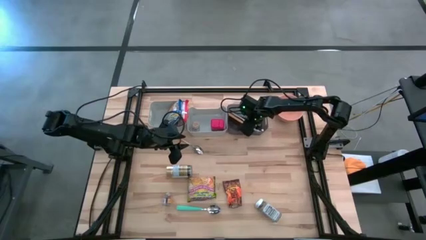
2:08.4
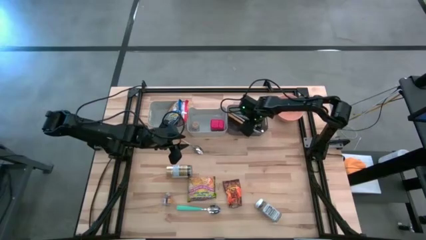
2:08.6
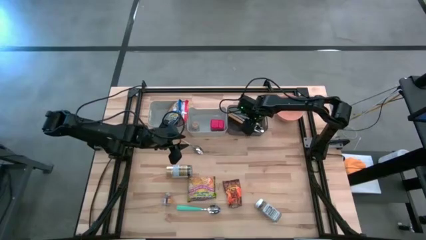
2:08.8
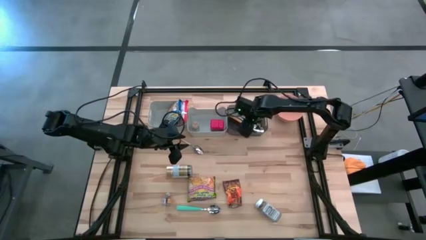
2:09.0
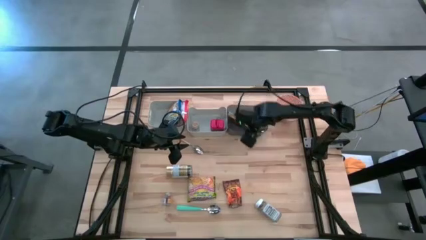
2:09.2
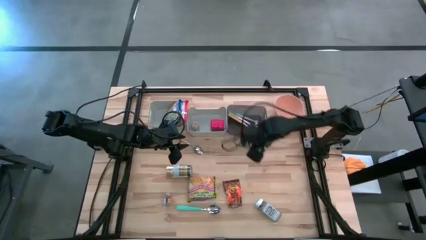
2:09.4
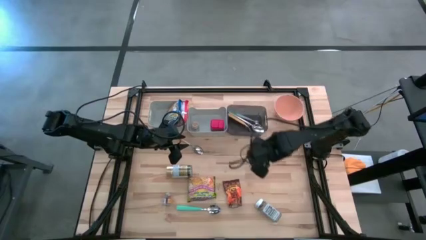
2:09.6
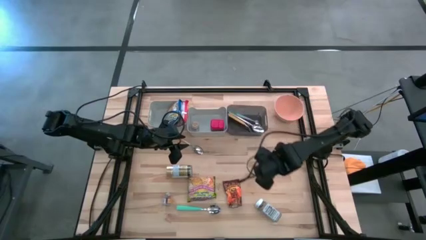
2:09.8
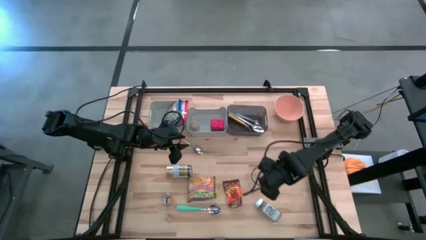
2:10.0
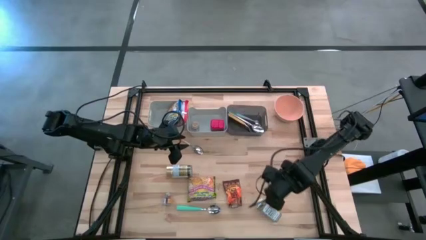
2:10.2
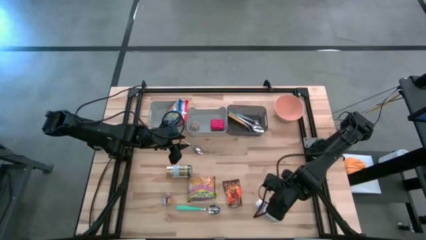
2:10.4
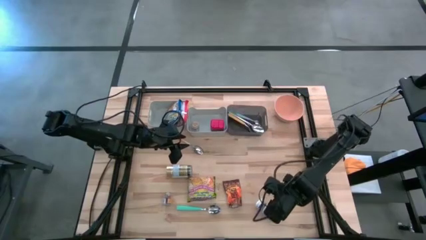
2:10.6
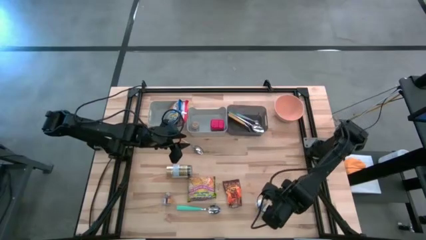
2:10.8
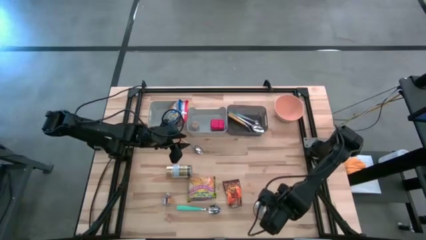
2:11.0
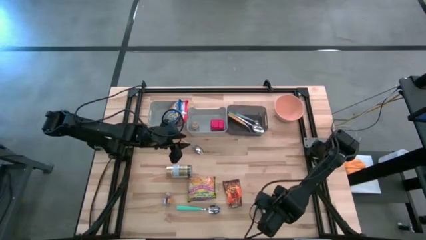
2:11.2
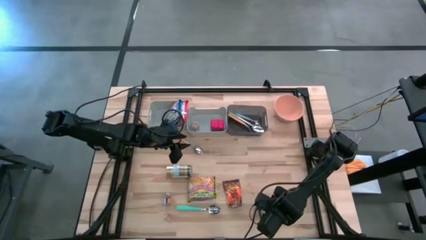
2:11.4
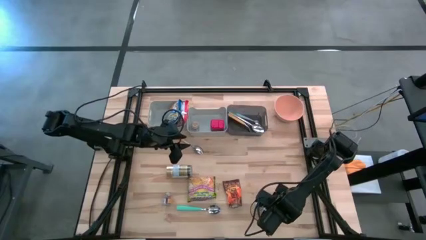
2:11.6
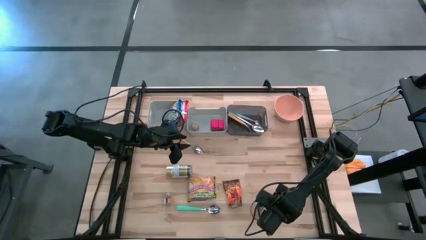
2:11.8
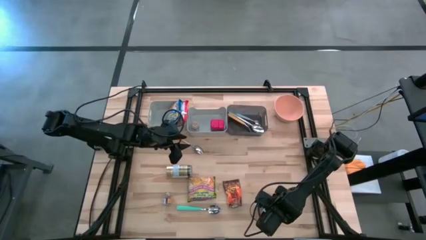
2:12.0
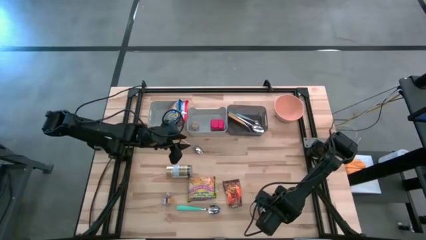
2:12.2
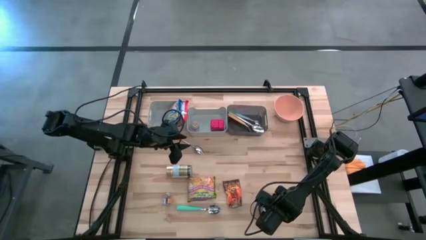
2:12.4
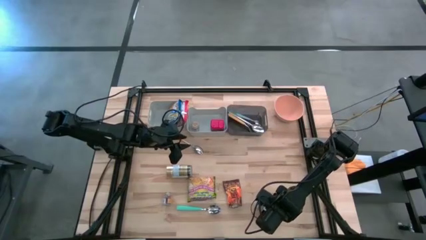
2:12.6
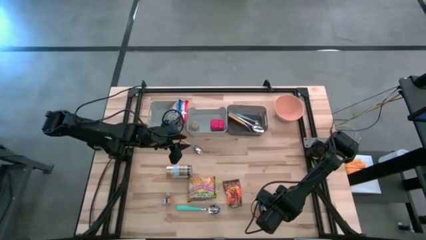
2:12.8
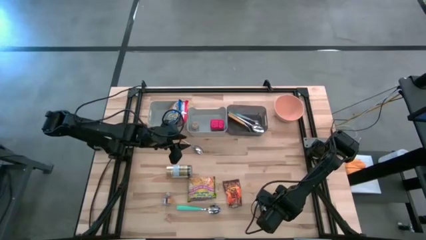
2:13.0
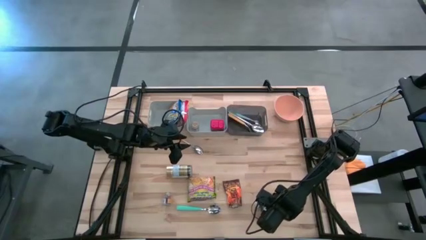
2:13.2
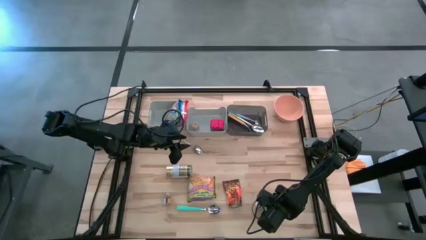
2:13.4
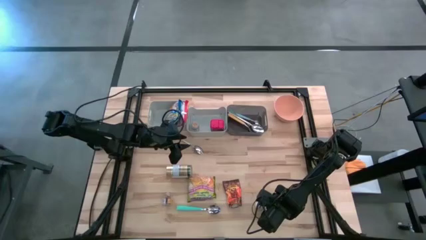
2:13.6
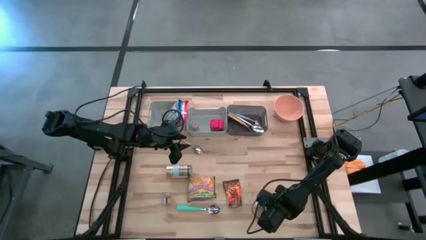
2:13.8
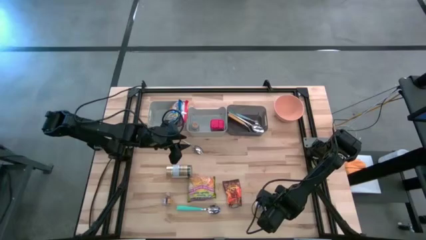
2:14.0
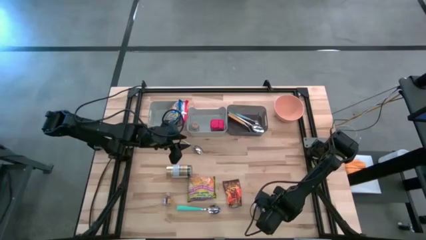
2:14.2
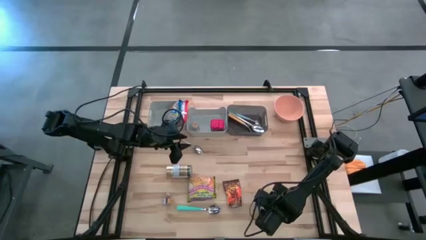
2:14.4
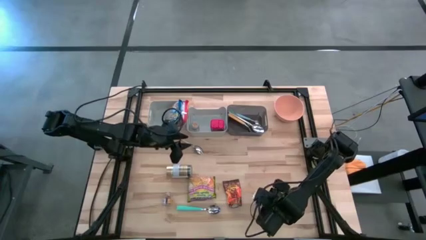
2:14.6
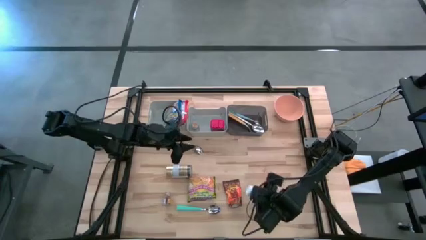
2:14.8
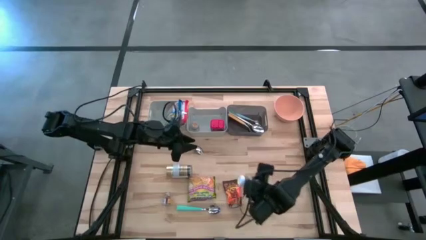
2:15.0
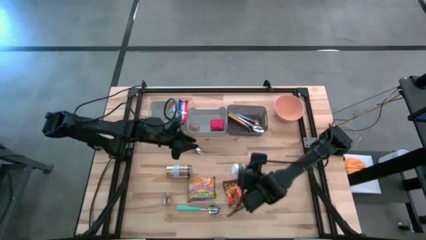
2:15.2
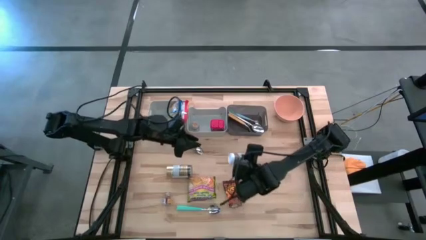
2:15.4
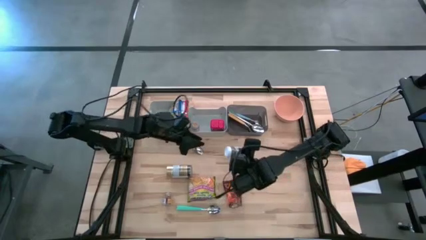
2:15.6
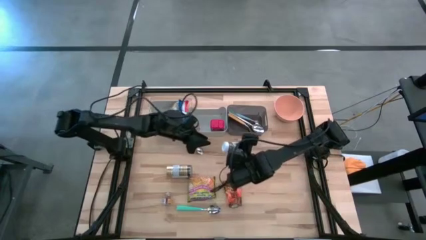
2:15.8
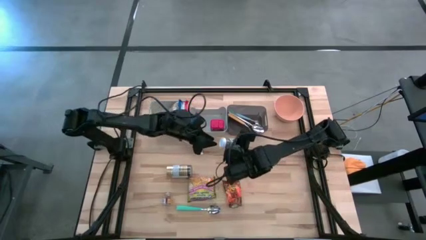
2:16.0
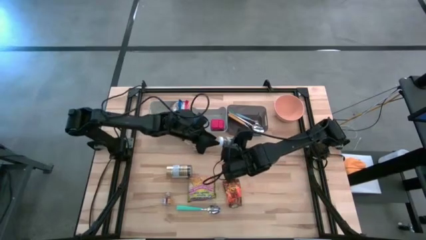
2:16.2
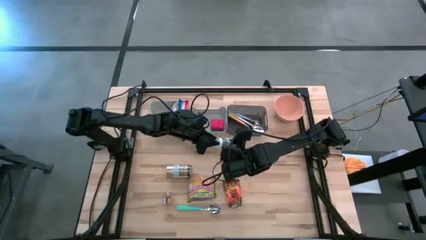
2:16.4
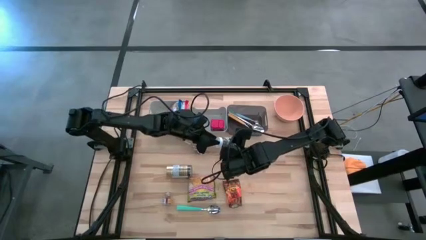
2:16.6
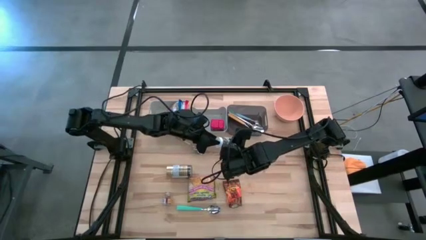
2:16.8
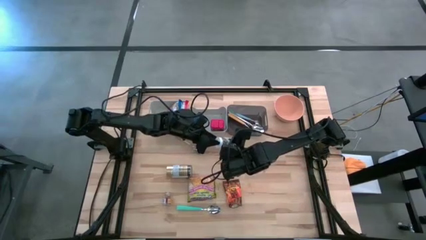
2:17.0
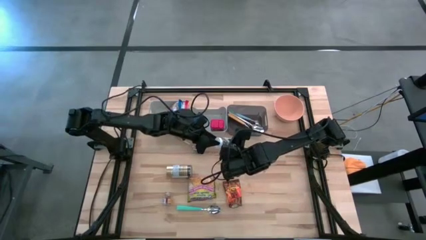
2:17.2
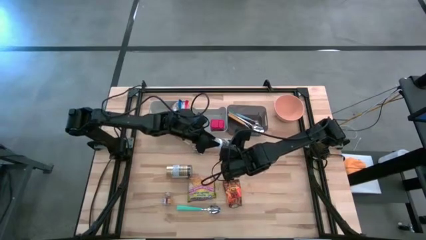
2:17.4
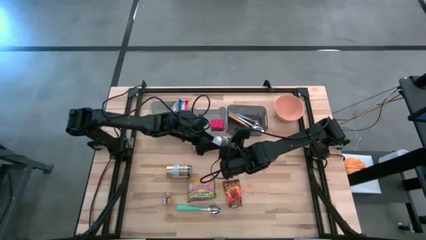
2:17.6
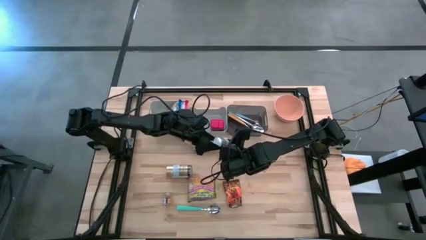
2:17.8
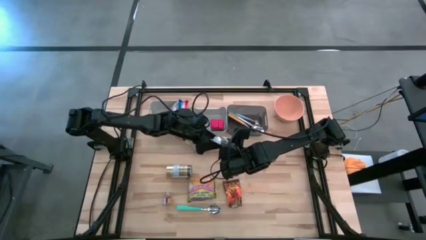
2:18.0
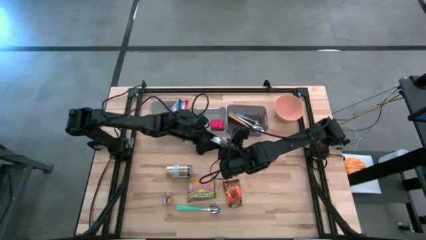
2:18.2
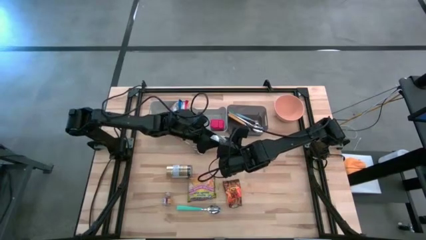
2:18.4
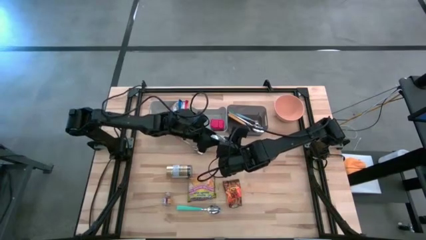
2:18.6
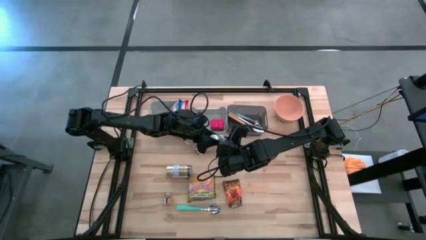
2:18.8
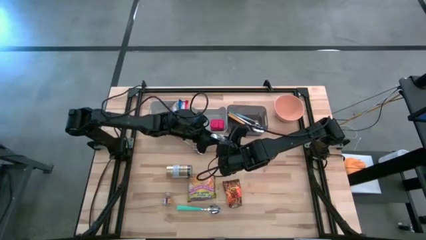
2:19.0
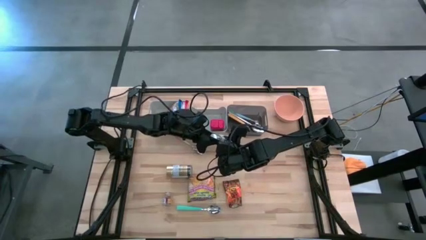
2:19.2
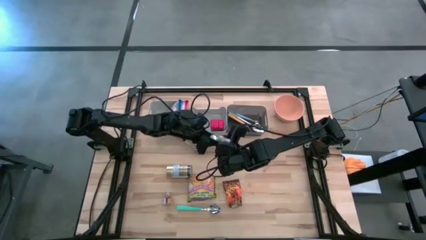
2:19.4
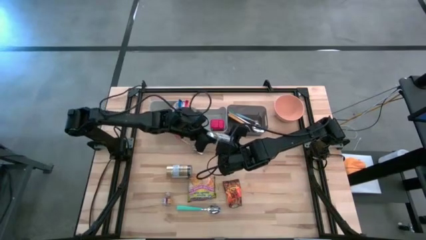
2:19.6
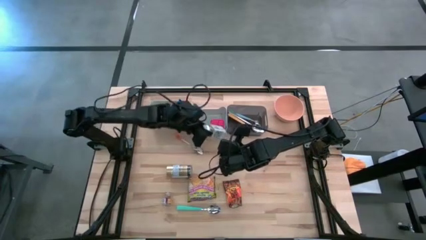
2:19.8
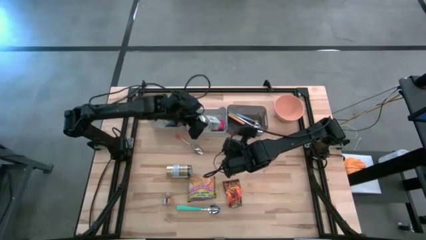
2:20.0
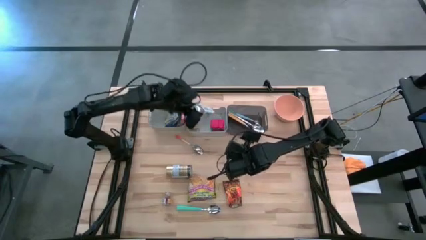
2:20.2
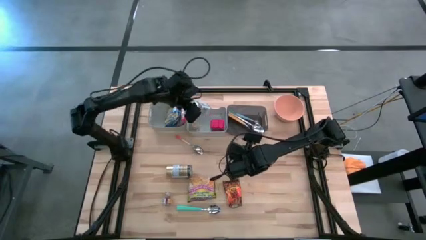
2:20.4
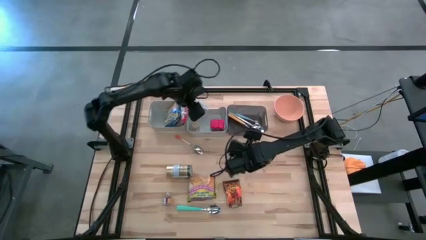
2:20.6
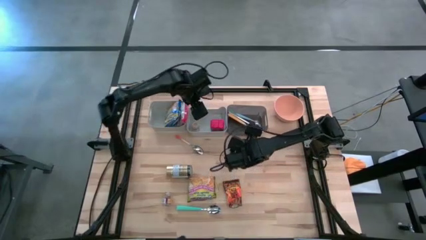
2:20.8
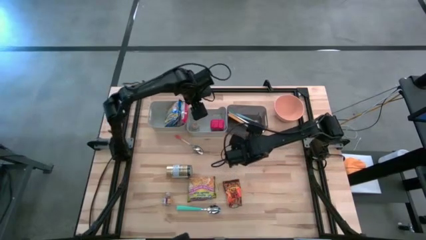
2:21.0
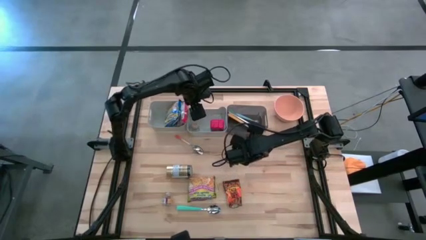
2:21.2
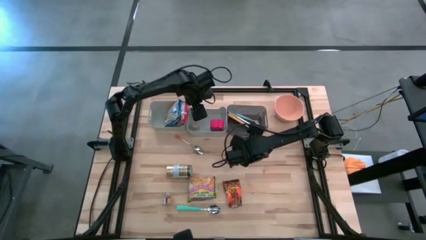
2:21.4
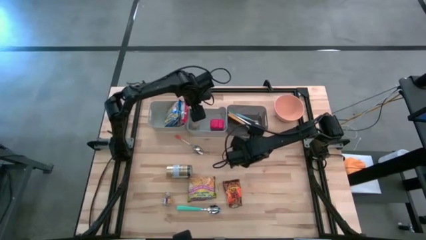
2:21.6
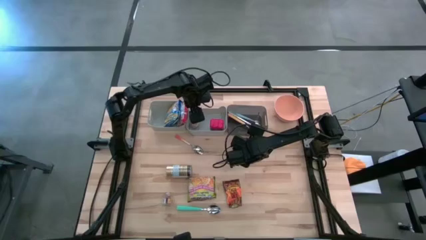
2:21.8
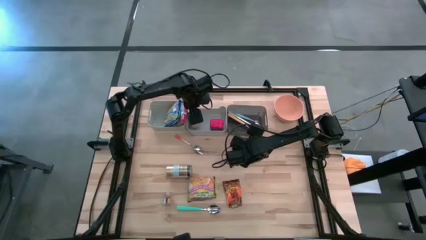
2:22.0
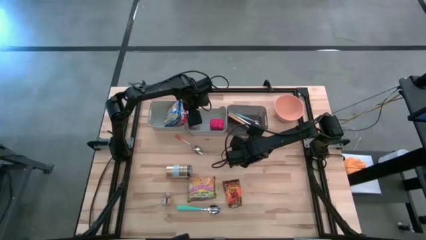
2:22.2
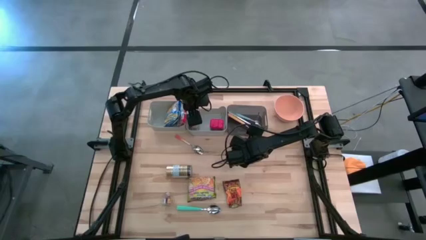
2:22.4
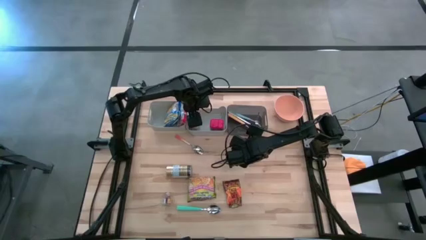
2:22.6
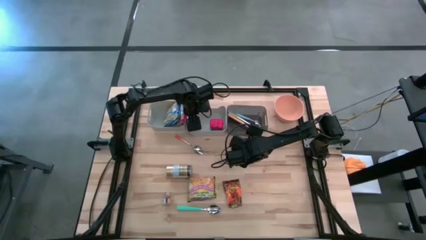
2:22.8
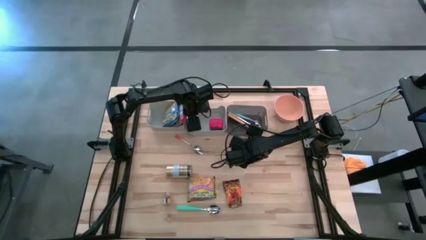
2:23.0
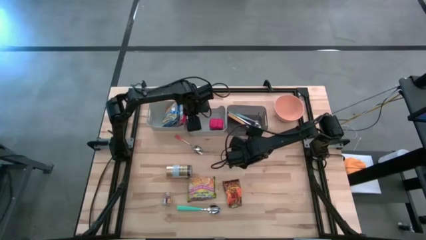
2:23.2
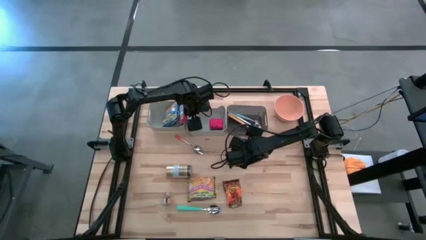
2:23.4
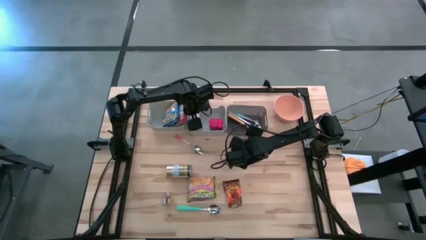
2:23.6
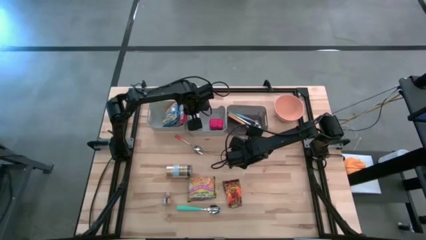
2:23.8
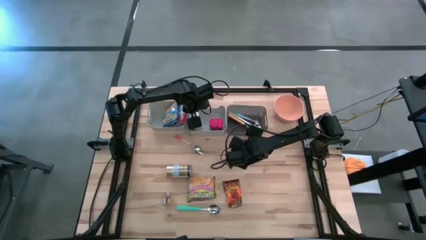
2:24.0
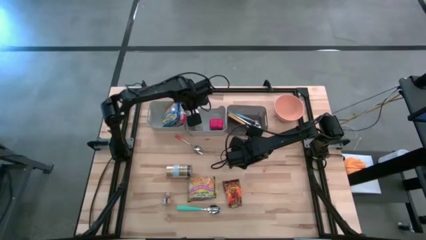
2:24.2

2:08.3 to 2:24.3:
Put the white seasoning bottle into the right gray bin
